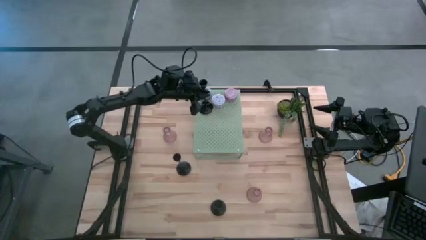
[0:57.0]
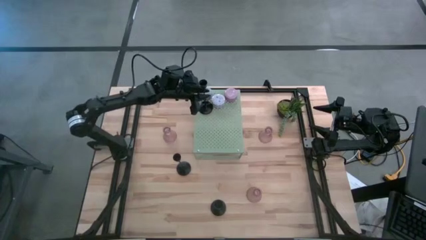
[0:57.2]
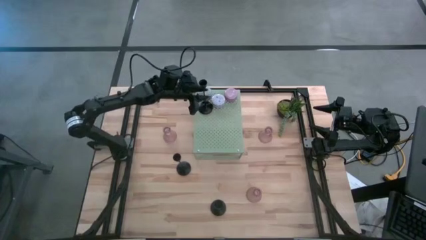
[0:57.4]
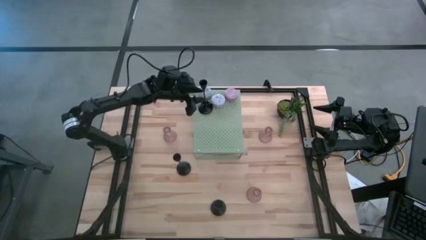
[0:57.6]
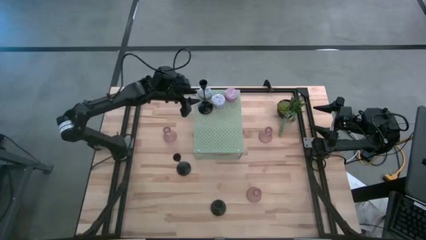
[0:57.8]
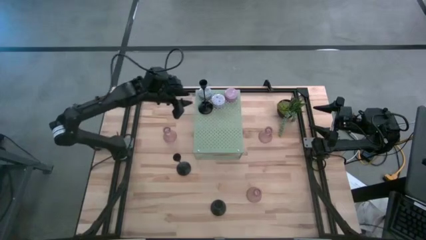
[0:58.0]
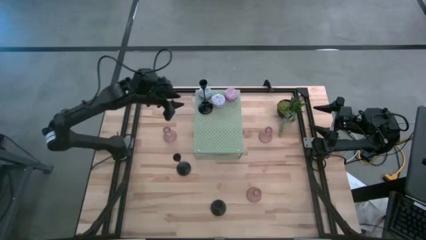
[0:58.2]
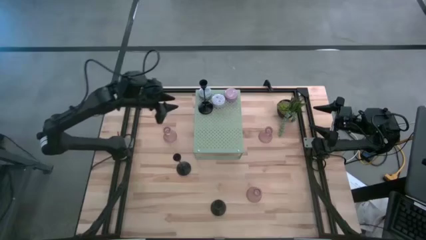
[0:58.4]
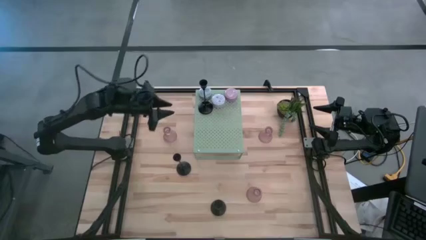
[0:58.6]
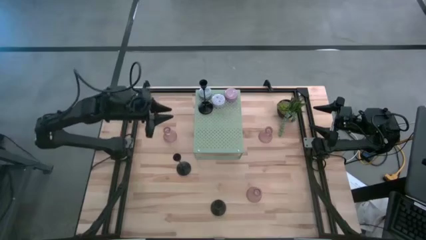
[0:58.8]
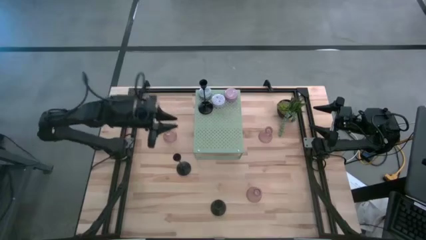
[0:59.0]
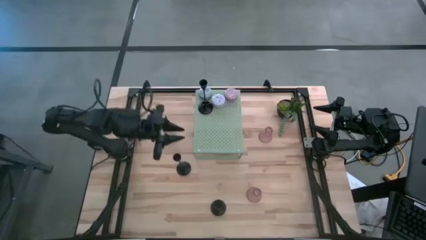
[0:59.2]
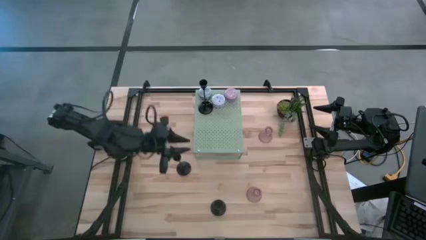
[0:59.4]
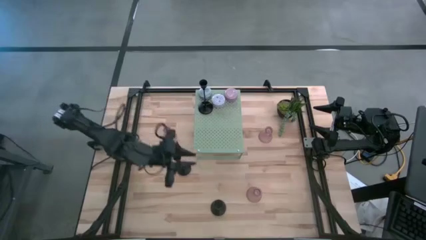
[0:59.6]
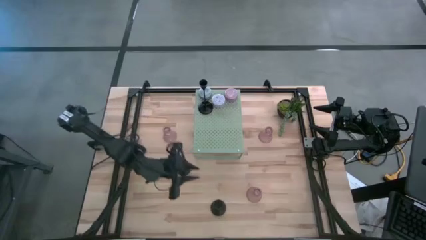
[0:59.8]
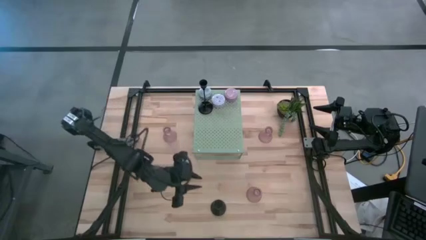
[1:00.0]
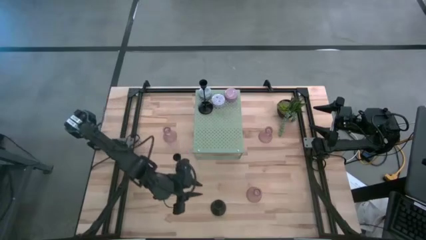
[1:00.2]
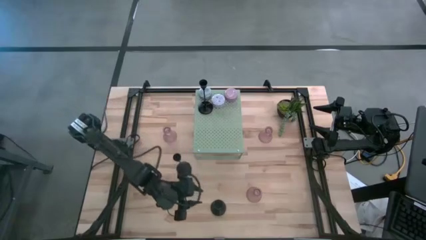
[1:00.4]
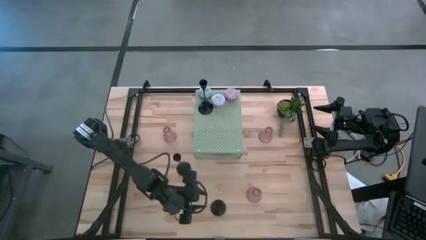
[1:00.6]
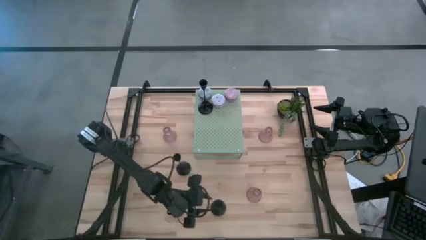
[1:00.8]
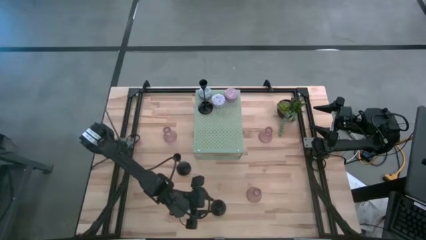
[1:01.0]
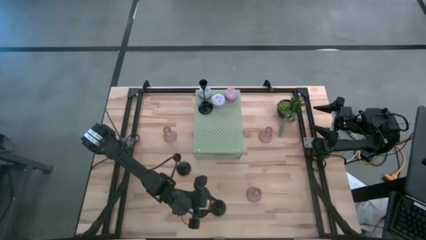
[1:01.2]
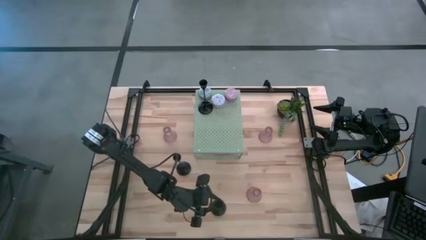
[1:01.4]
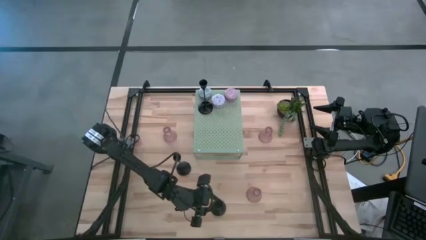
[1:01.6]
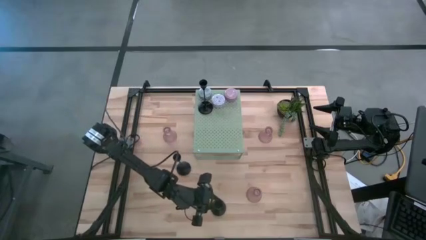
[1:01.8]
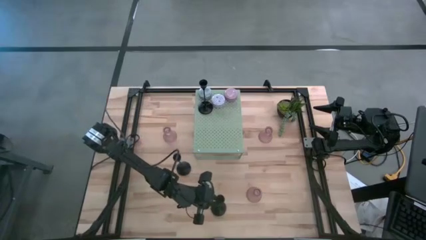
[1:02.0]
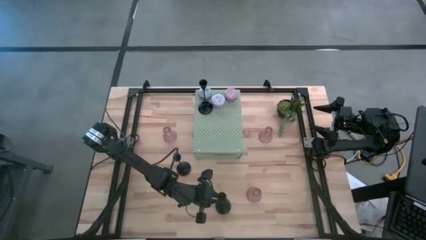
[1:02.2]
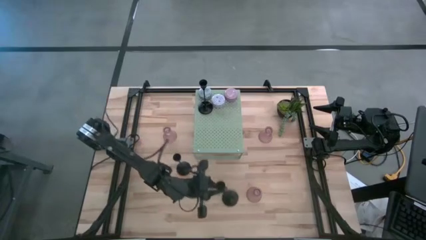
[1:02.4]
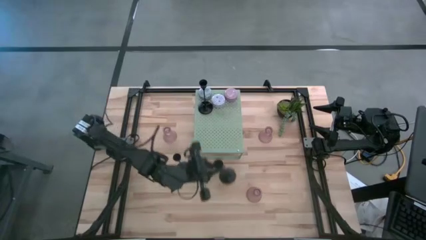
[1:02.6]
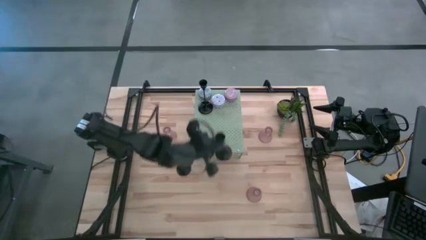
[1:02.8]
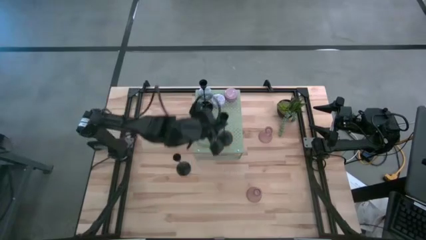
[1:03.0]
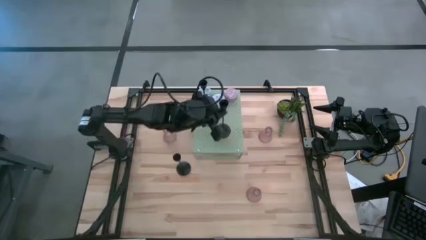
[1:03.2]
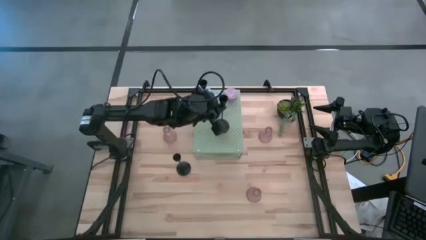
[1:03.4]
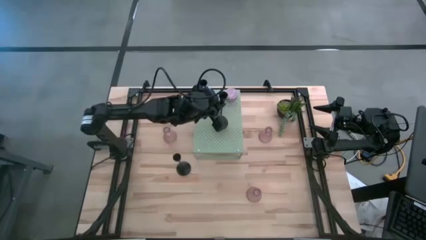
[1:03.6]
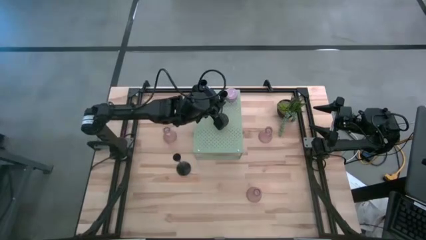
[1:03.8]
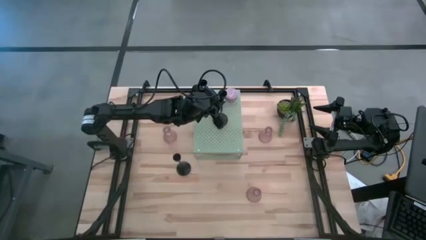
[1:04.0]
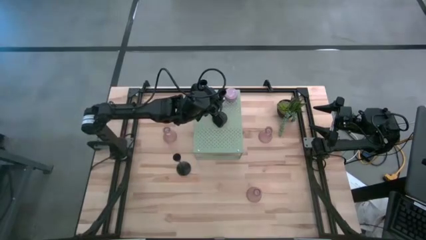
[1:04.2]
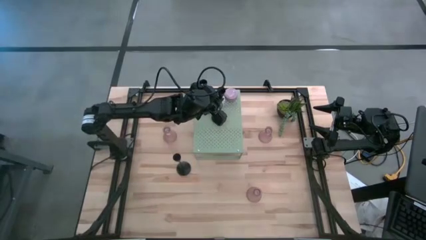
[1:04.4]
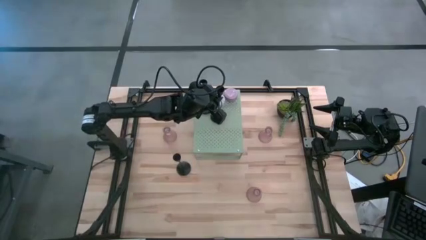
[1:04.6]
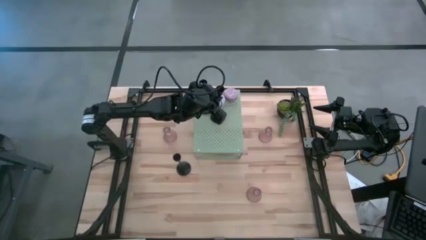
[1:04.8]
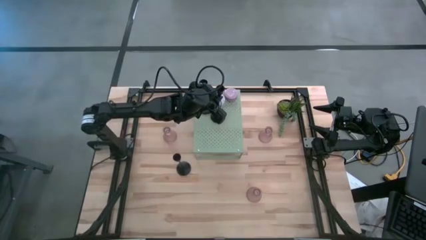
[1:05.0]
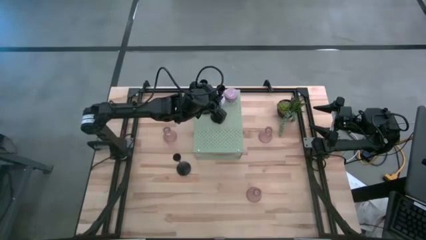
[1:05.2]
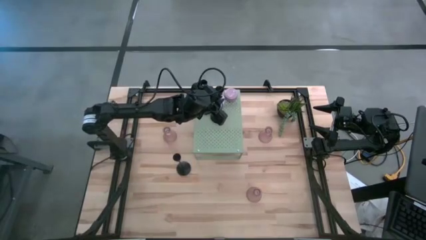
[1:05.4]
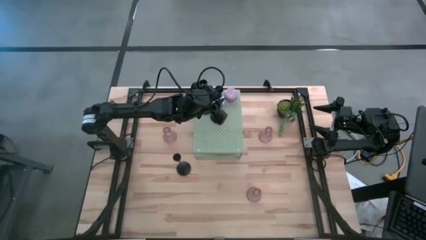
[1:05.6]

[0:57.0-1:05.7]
Task: Pick & Place candle stick holders
Put the bottom black candle holder on the shelf

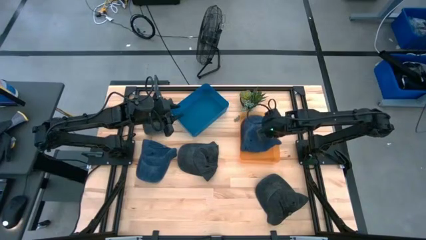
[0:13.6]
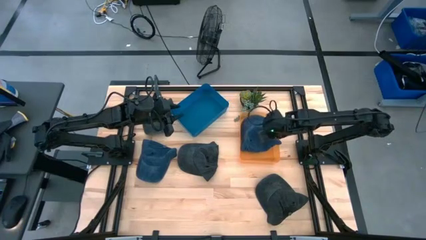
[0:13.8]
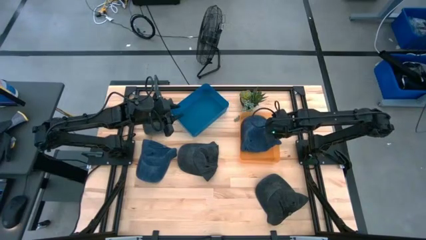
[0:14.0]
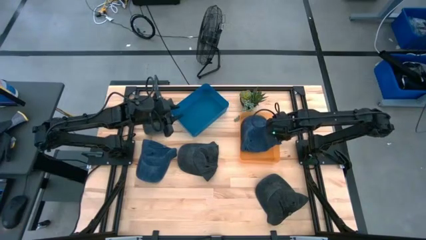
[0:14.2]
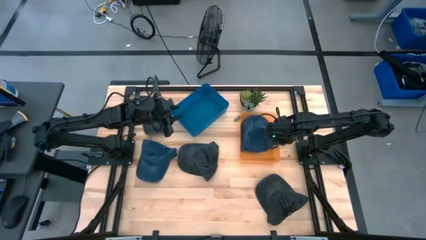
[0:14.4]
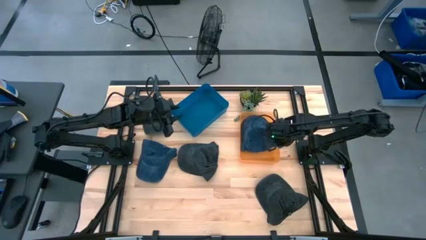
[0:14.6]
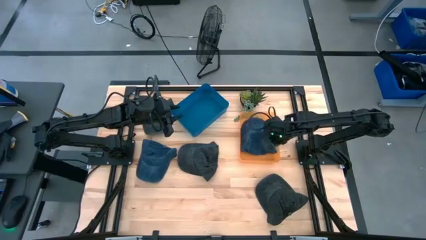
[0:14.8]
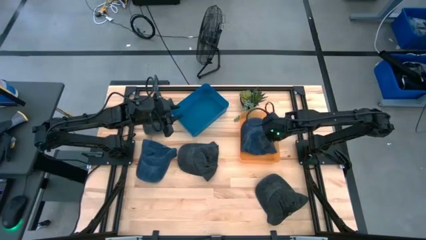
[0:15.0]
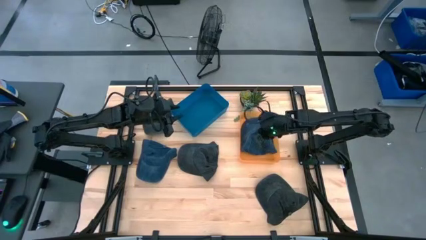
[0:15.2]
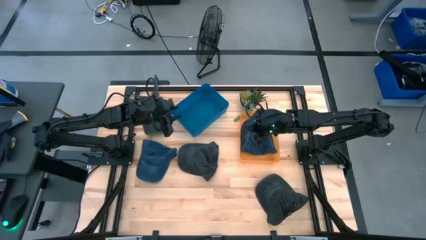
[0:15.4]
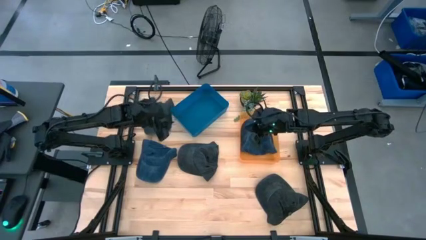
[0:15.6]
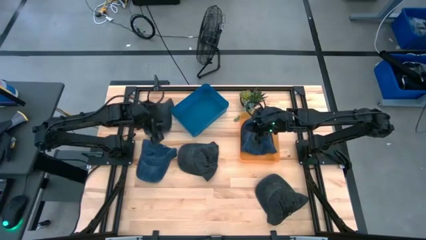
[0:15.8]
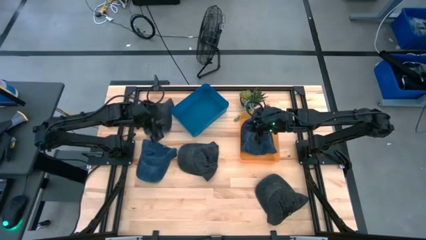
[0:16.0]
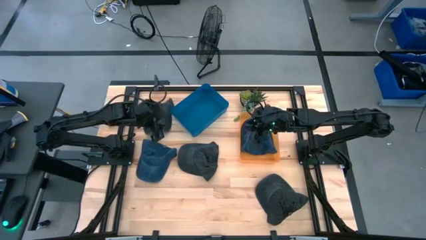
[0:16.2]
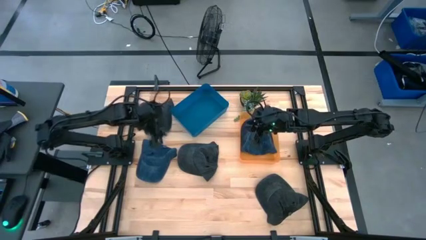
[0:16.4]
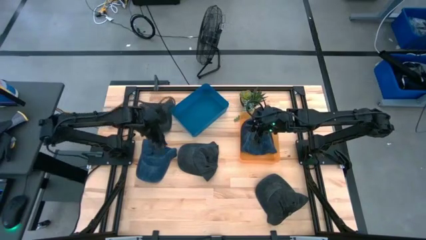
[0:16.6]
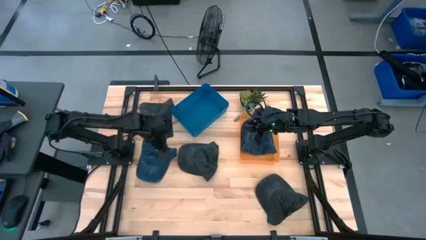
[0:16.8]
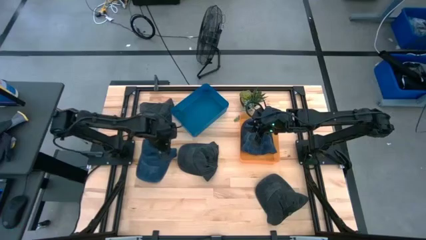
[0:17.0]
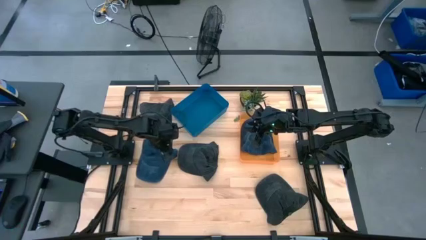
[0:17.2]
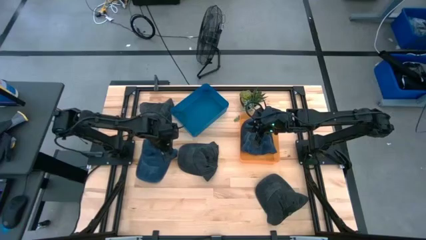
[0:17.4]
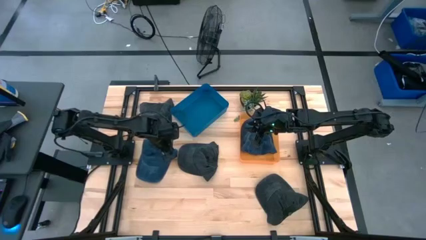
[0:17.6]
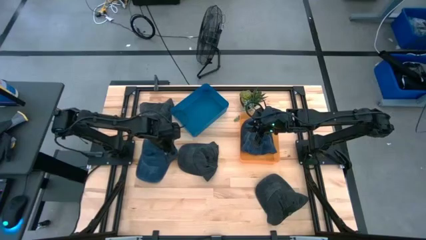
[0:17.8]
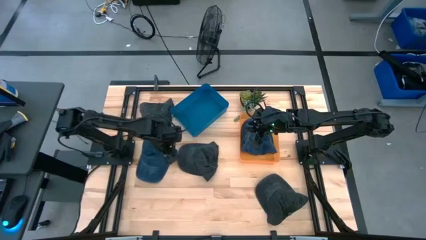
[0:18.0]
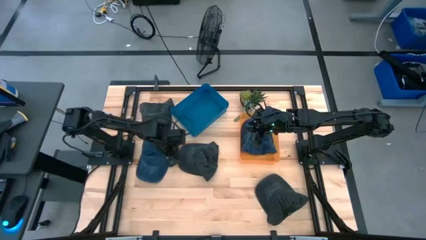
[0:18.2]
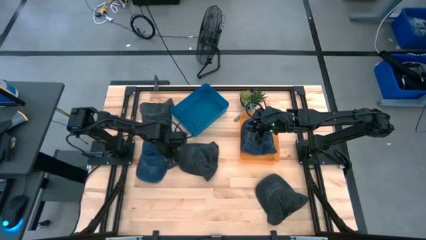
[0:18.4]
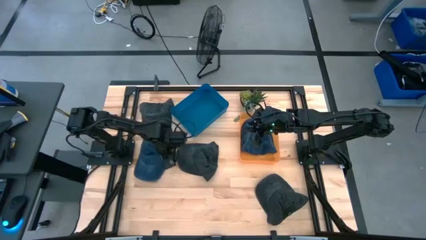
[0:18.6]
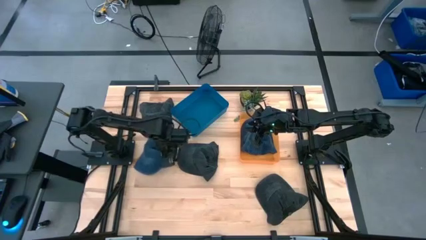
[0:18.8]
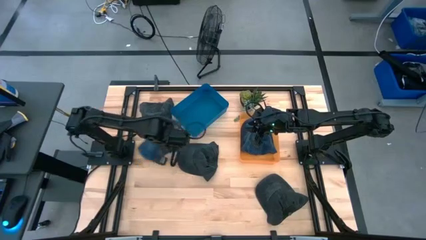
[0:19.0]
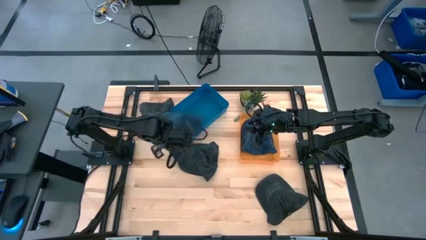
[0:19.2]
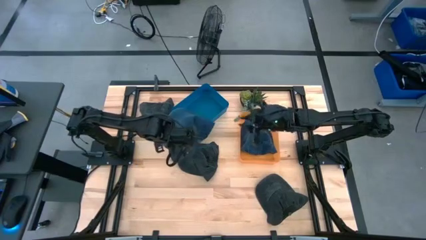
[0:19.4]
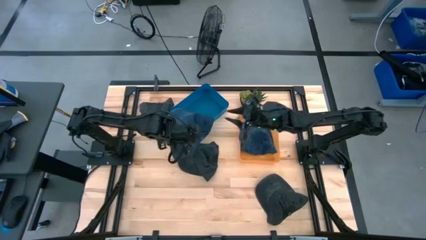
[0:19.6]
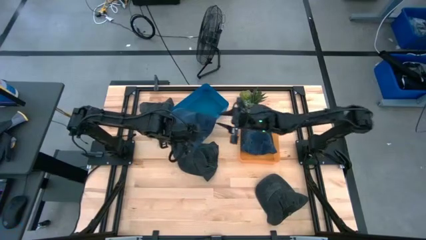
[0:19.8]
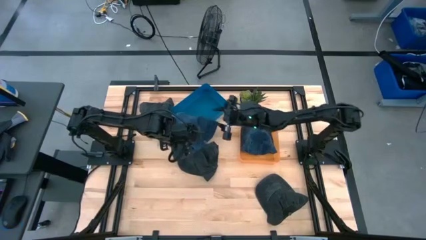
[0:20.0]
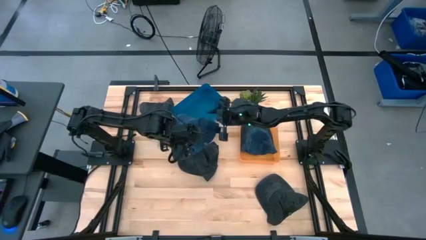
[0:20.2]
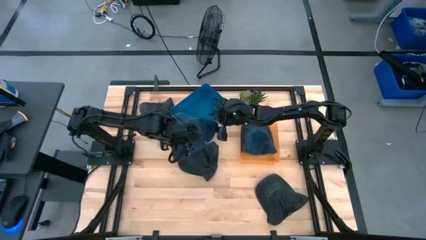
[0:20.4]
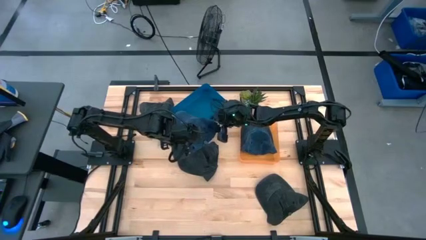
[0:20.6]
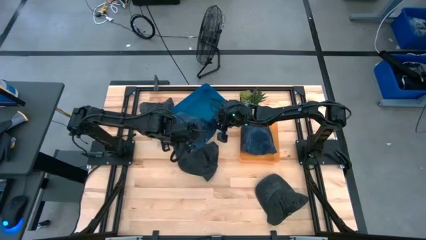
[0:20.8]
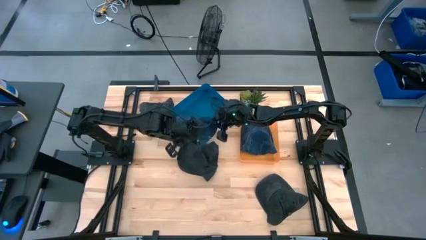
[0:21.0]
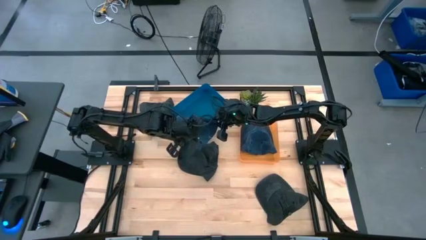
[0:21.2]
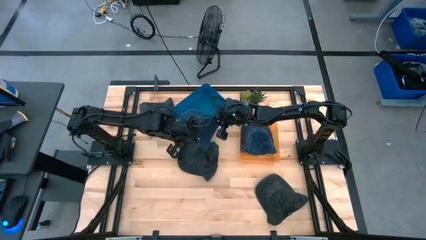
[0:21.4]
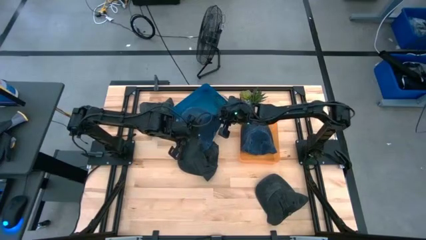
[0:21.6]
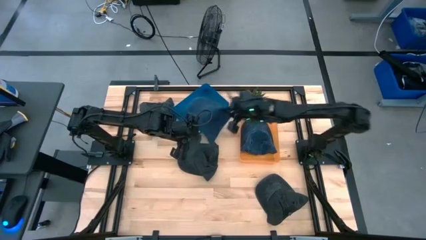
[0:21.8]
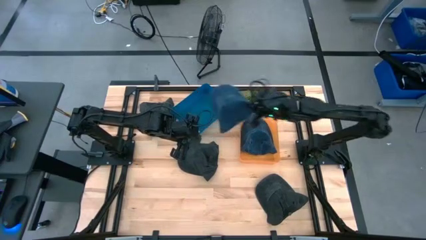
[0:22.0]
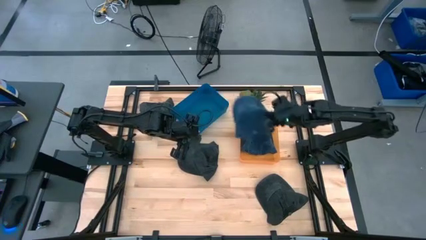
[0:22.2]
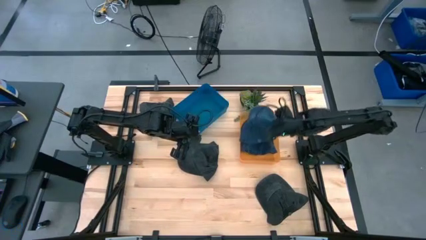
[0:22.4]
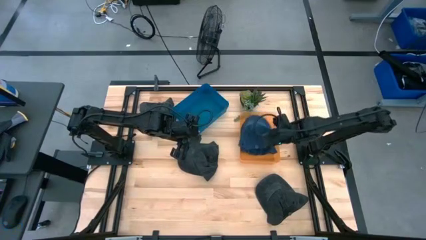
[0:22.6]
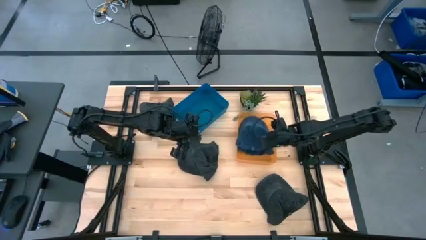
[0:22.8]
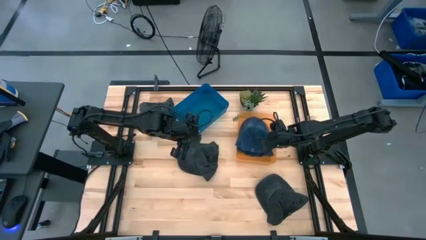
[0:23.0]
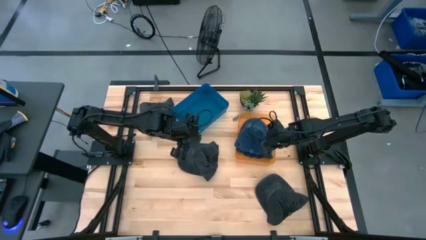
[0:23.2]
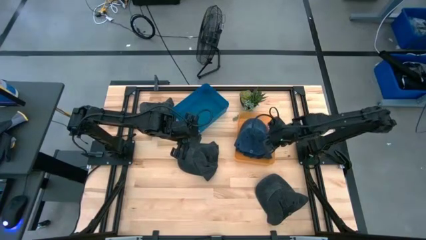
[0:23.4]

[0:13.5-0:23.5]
Task: Pick & Place hat
Put the blue cap into the orange bin
